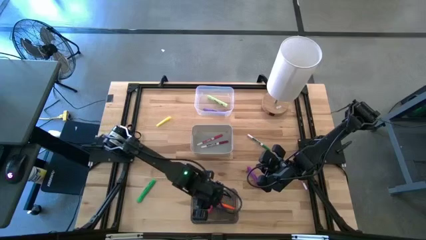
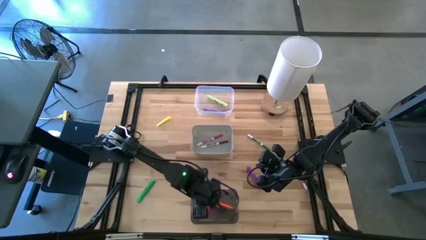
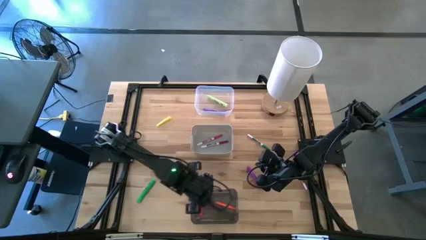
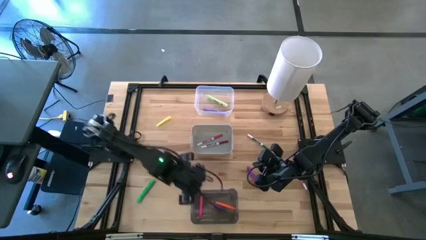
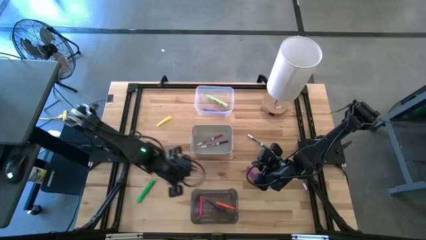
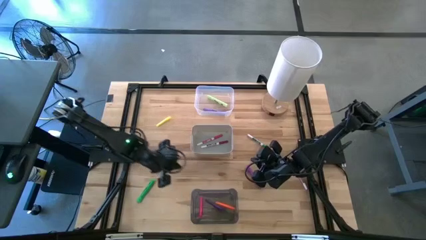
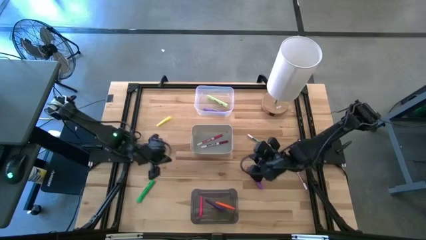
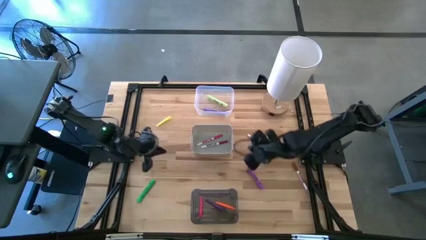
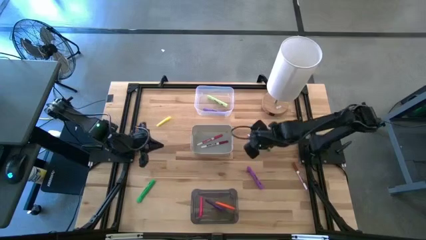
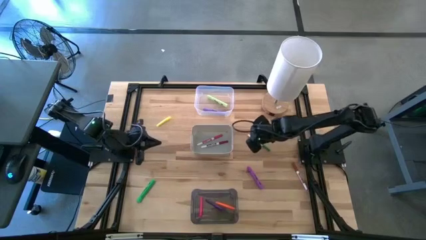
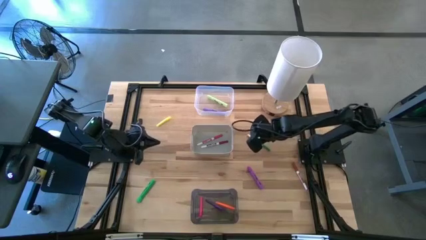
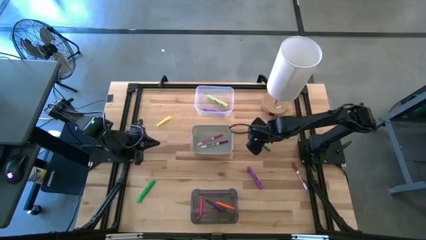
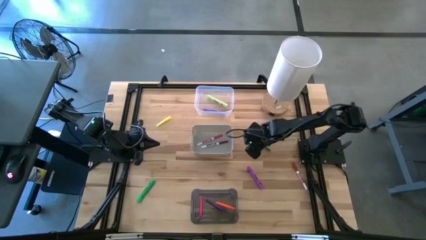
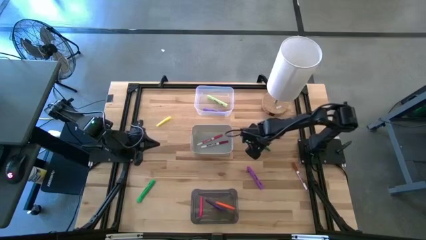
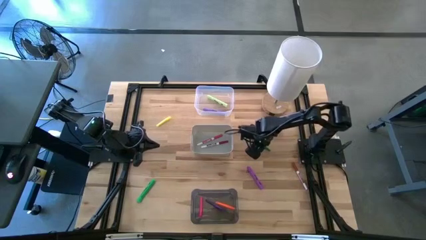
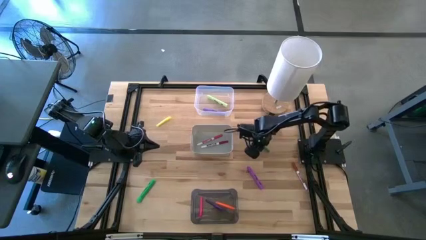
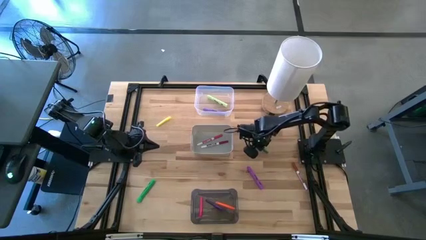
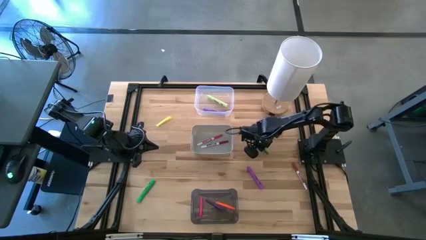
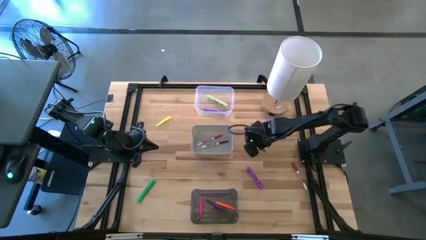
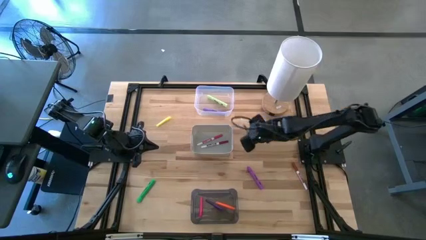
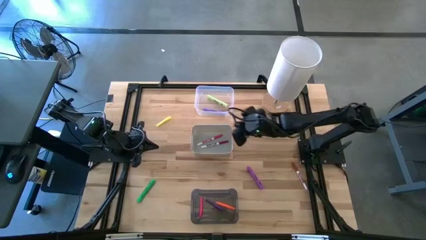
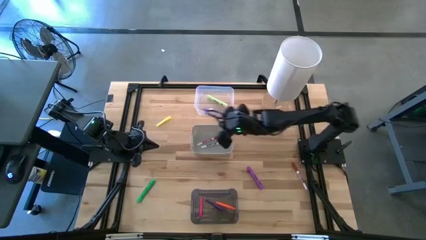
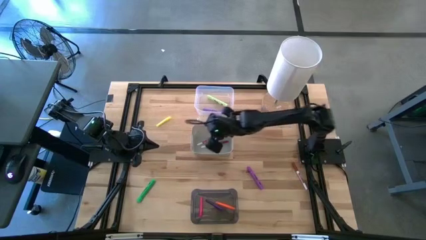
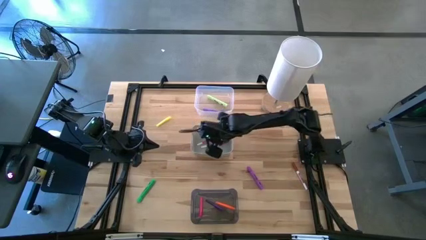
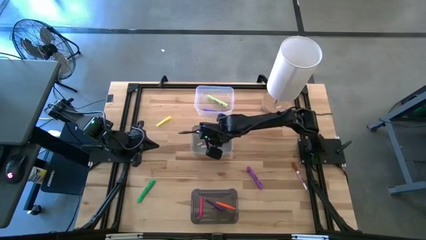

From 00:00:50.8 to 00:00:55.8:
Task: Pick & Place Markers
Put the green marker into the gray bin

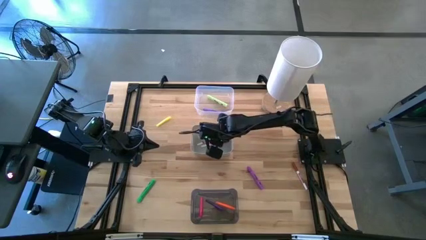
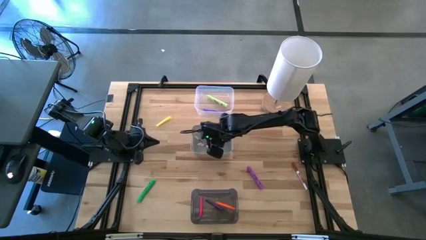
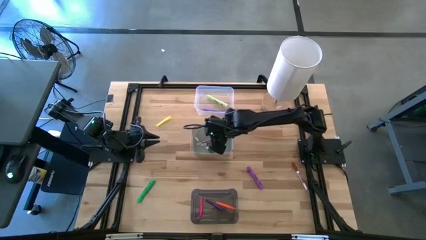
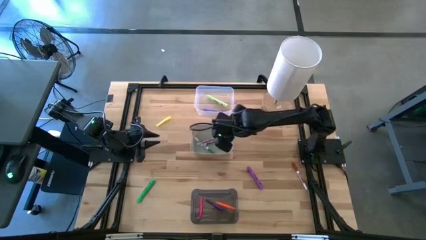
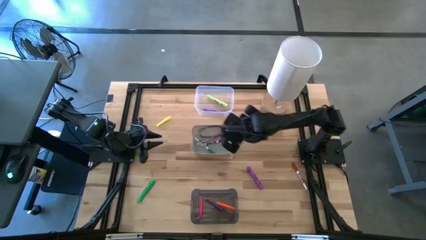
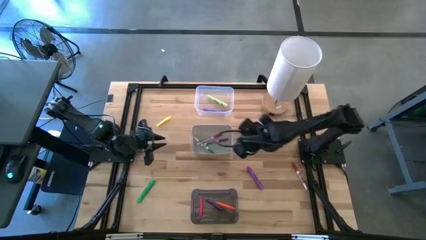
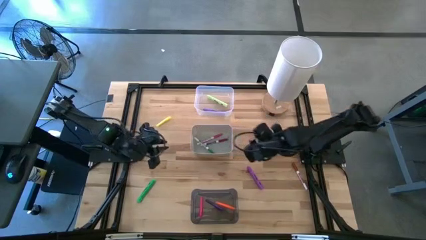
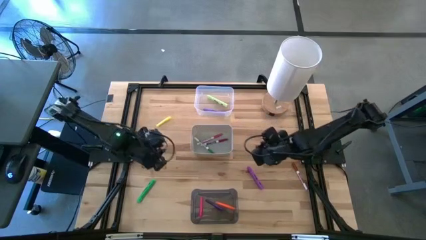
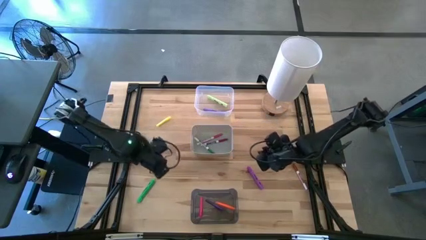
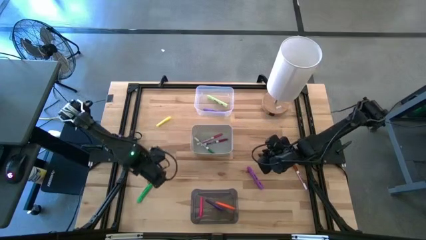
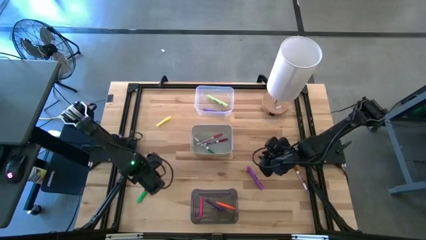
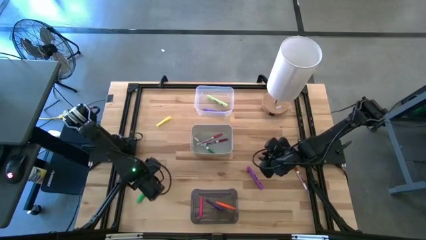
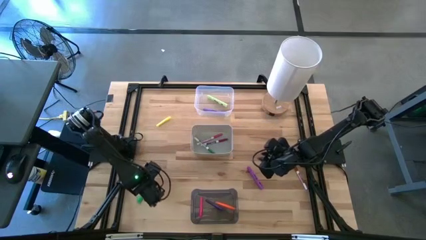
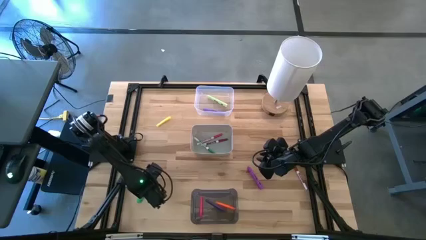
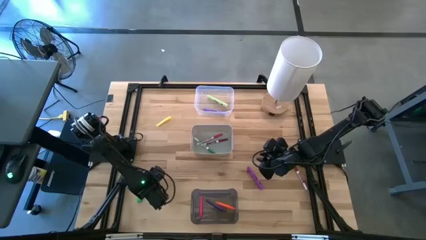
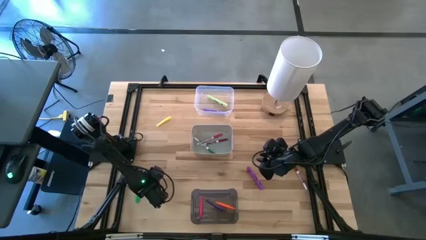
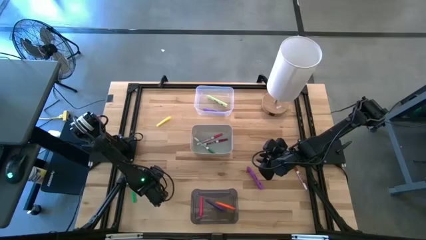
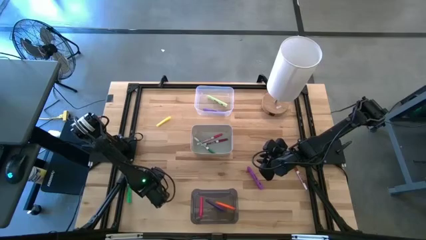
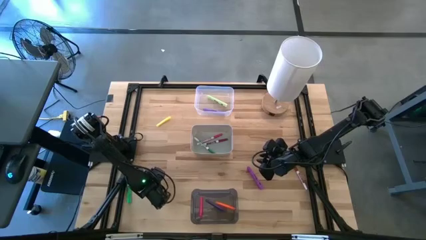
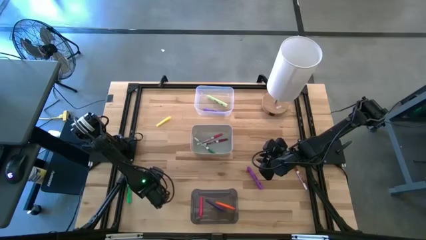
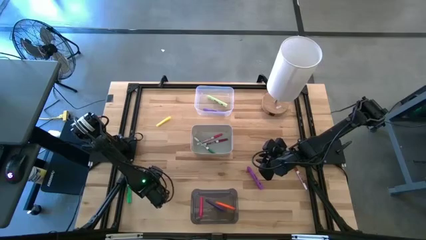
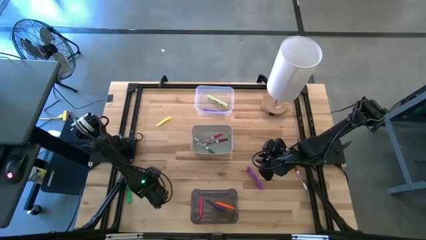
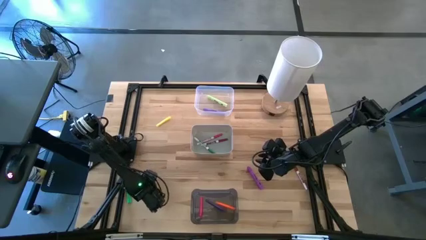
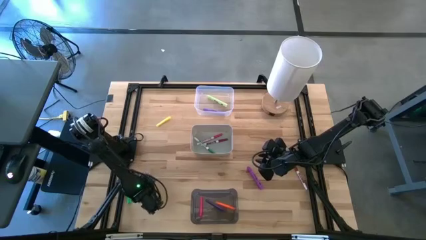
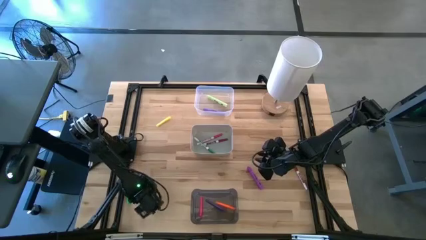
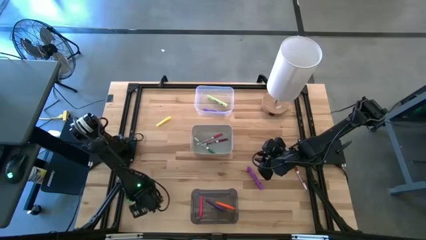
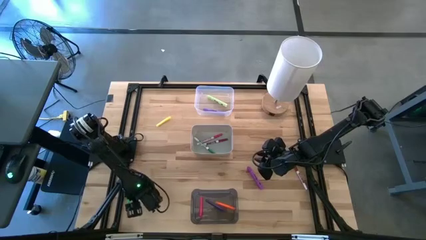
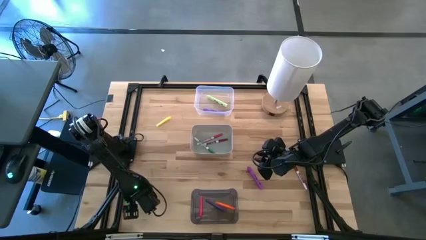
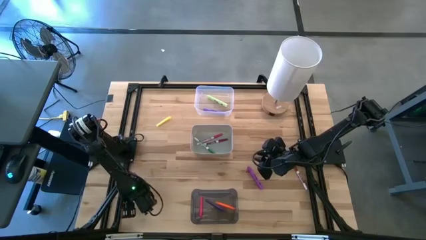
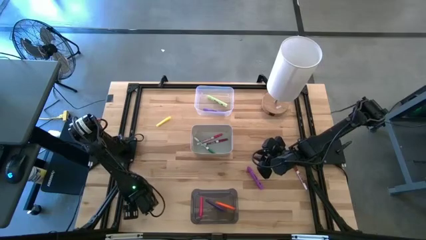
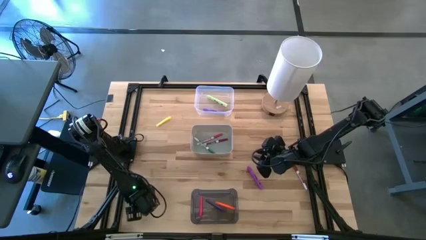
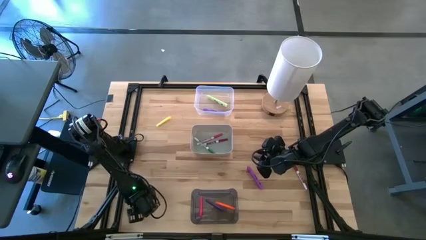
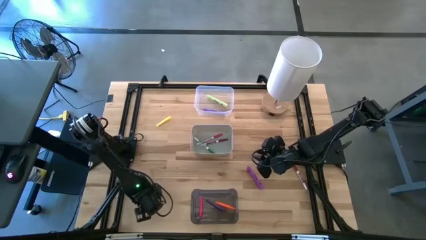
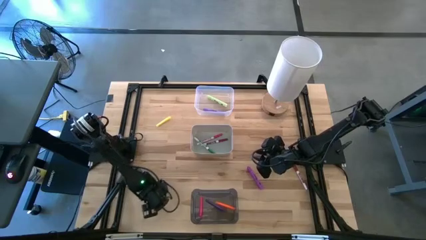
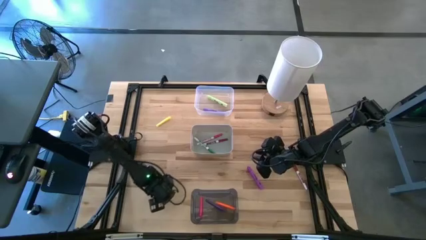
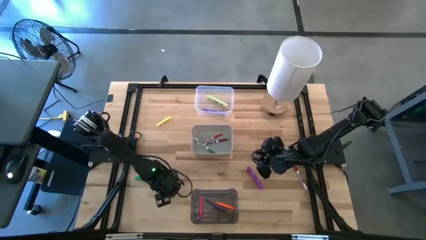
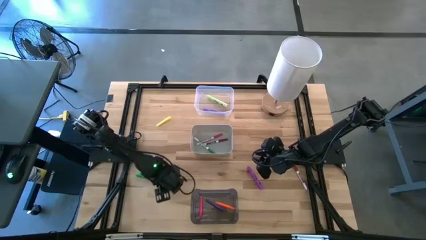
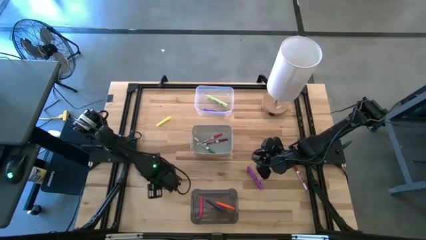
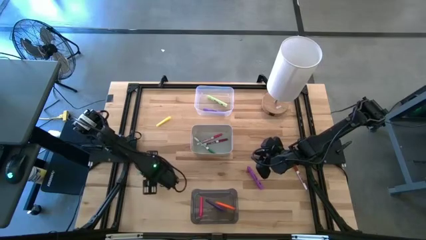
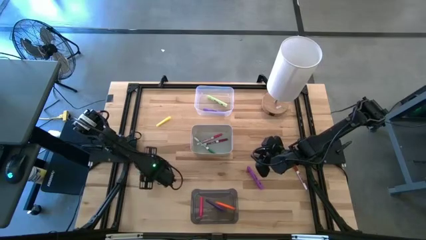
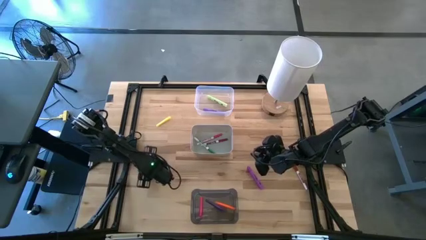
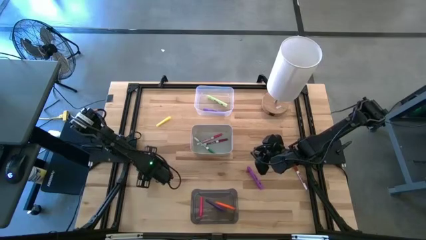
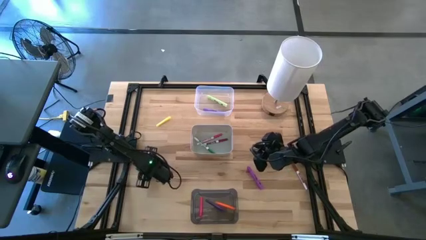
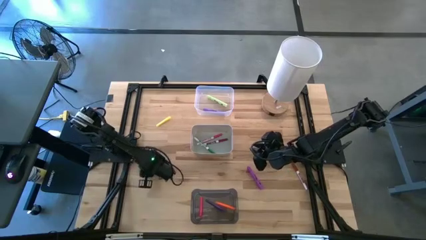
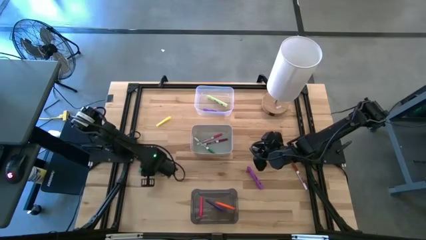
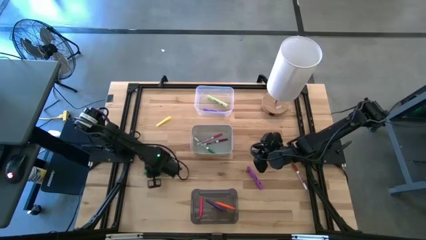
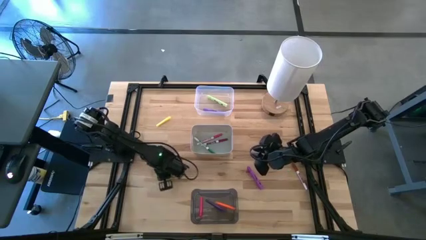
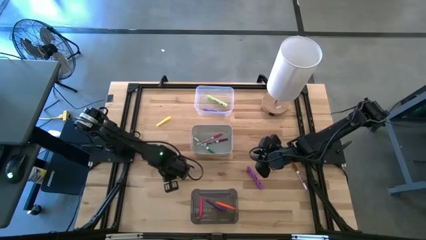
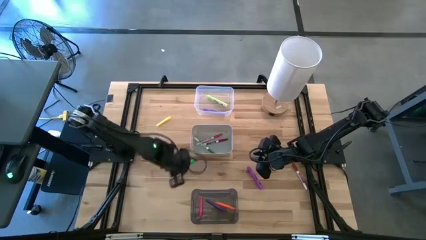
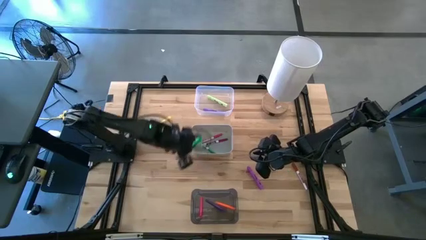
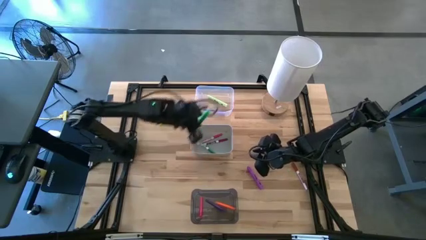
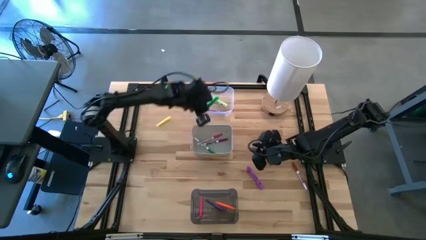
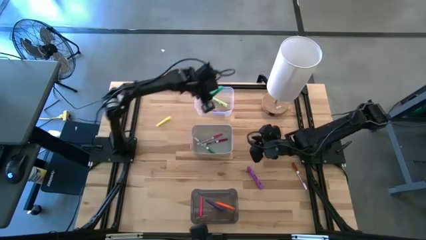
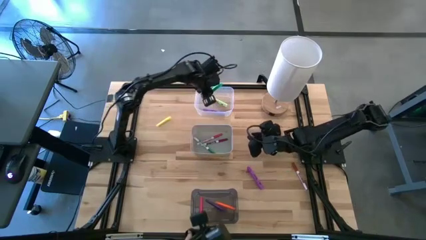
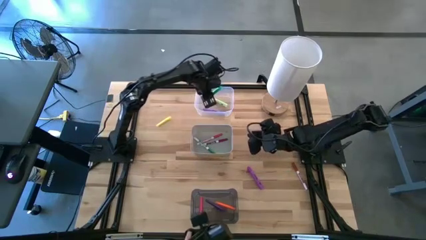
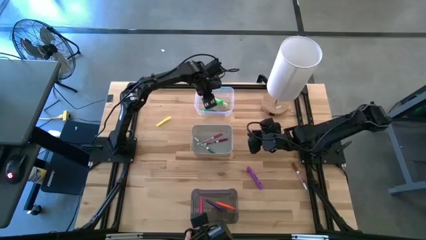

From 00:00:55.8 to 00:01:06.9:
Put the green highlighter into the transparent bin

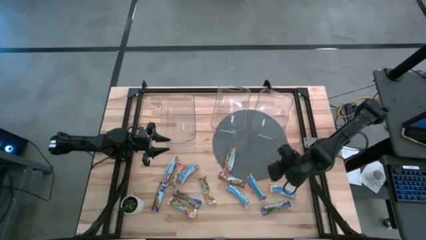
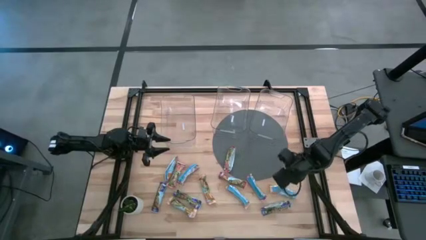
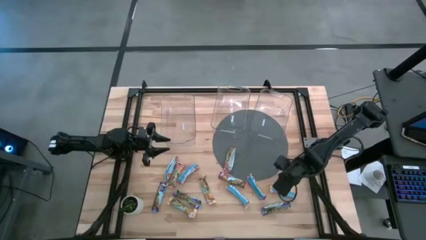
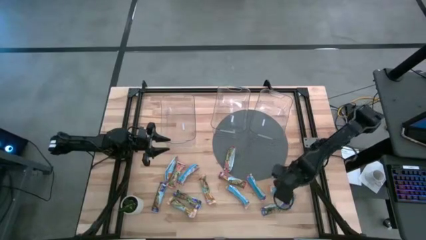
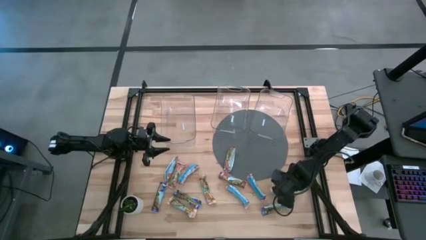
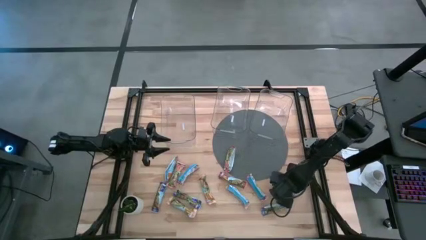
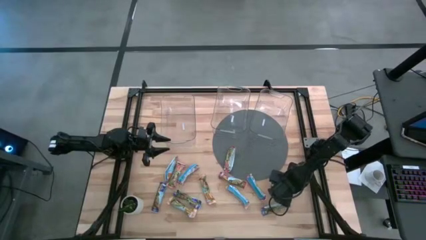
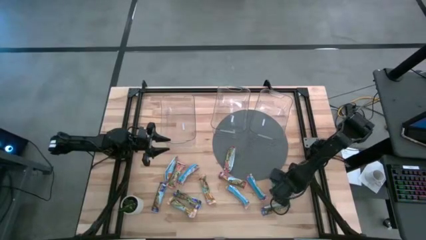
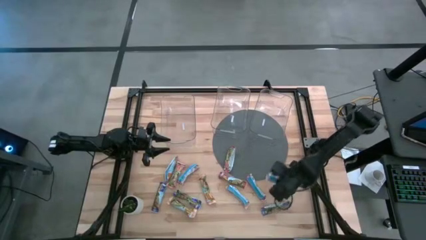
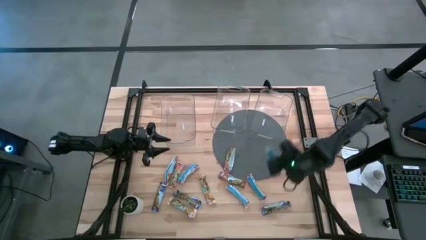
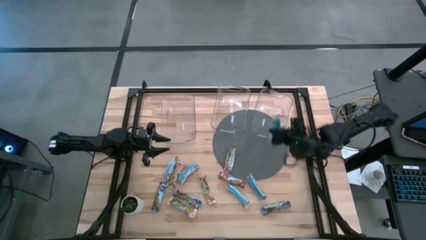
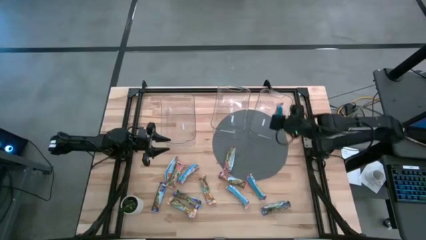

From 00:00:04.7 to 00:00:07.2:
Task: Pick and place Granola Bars by type
Put the yellow granola bar into the right transparent bin
